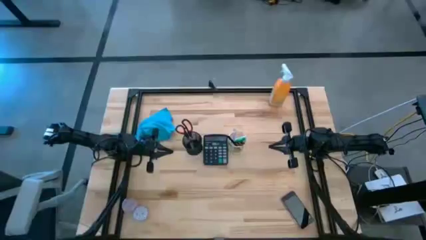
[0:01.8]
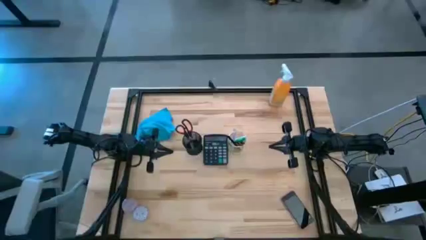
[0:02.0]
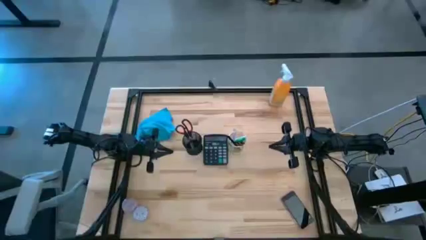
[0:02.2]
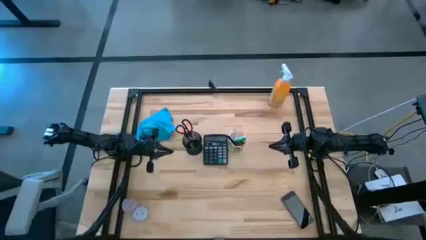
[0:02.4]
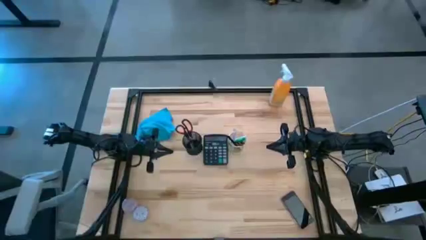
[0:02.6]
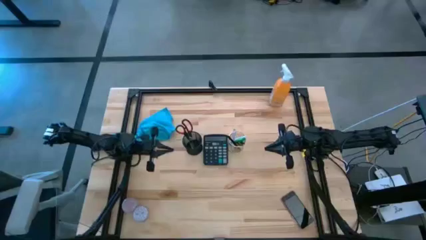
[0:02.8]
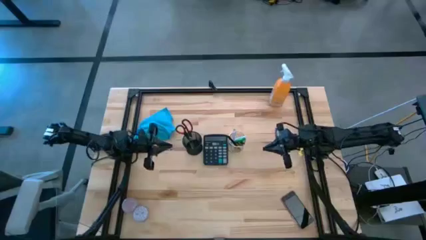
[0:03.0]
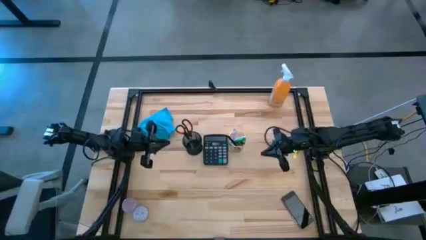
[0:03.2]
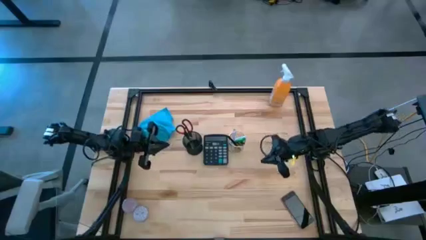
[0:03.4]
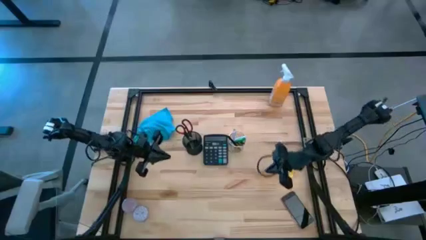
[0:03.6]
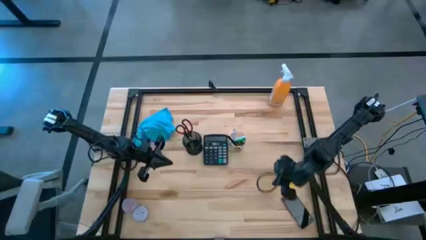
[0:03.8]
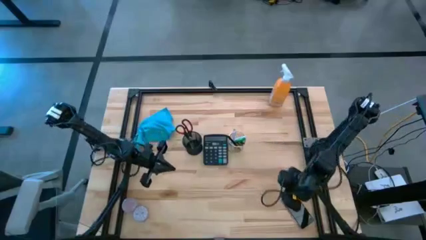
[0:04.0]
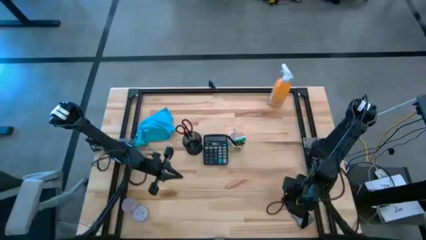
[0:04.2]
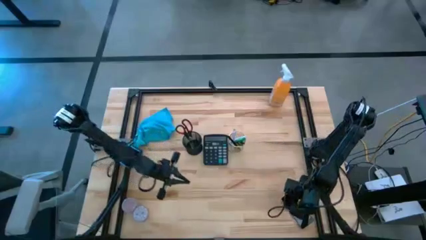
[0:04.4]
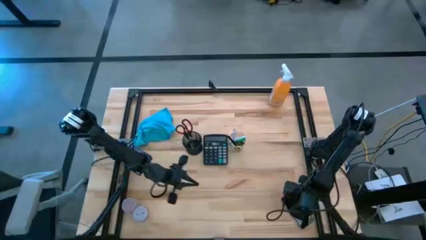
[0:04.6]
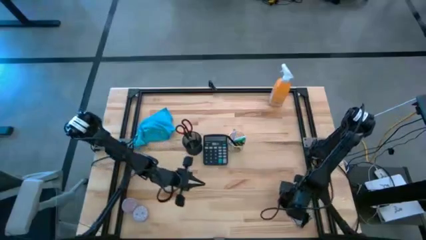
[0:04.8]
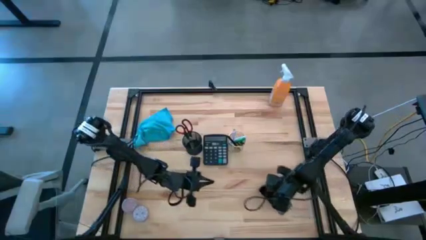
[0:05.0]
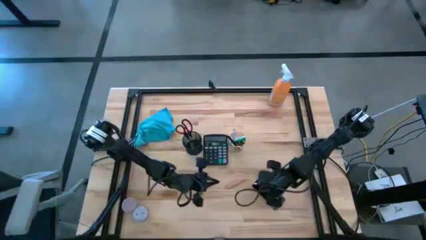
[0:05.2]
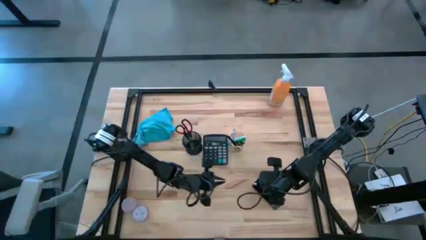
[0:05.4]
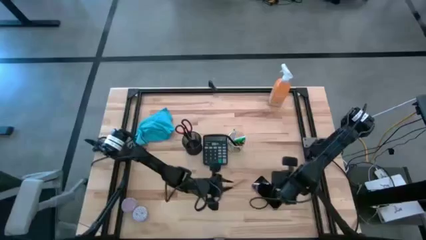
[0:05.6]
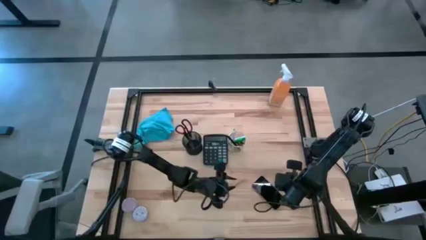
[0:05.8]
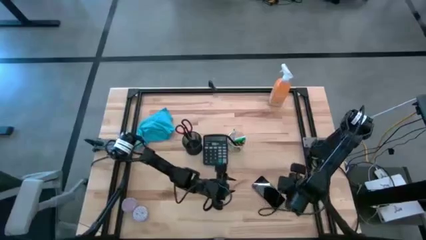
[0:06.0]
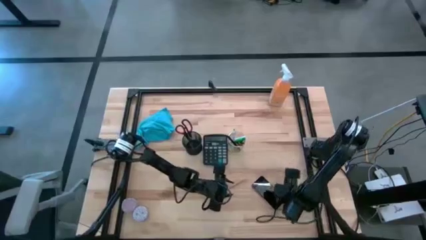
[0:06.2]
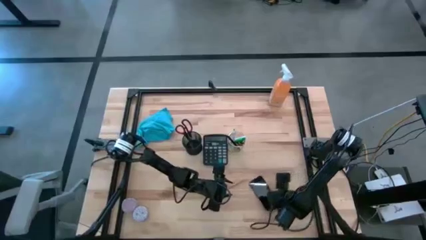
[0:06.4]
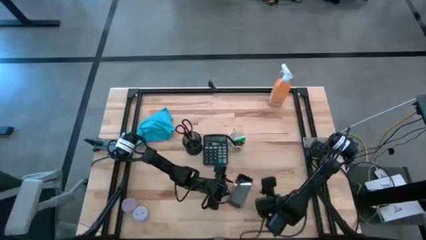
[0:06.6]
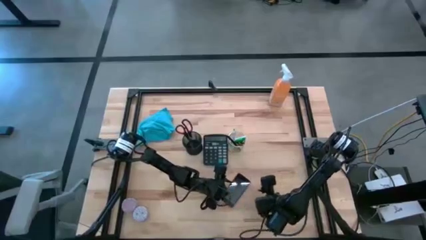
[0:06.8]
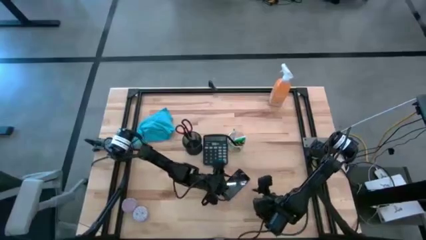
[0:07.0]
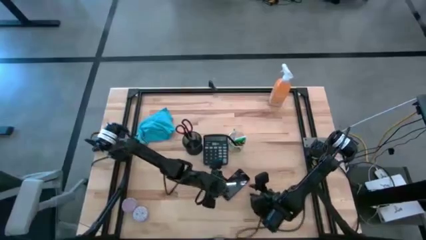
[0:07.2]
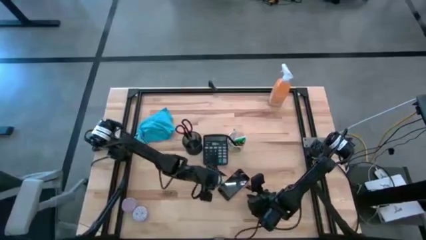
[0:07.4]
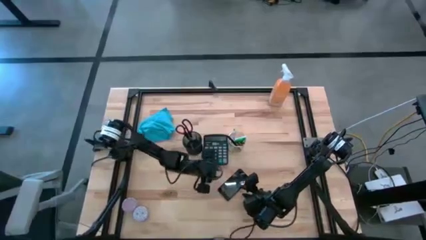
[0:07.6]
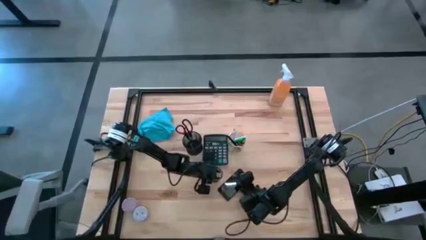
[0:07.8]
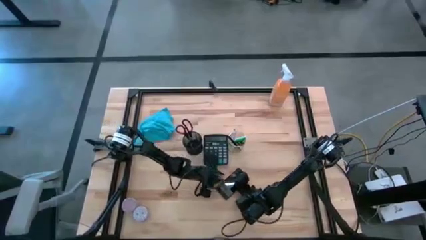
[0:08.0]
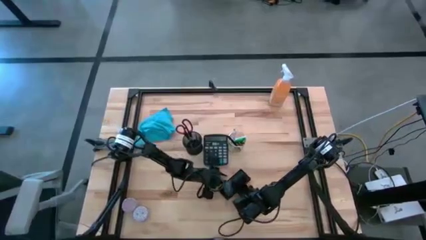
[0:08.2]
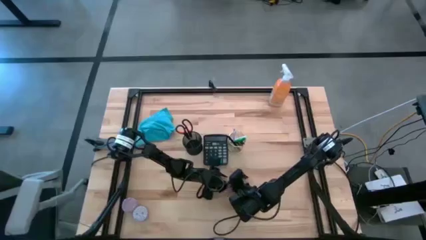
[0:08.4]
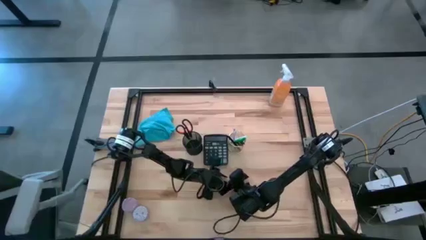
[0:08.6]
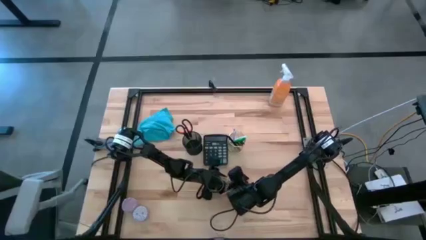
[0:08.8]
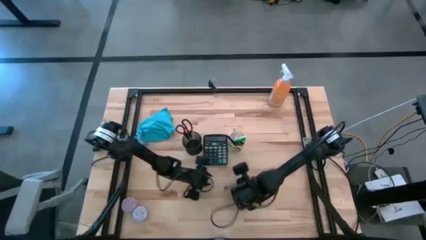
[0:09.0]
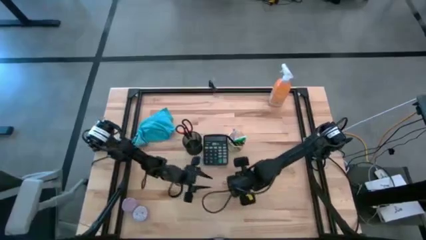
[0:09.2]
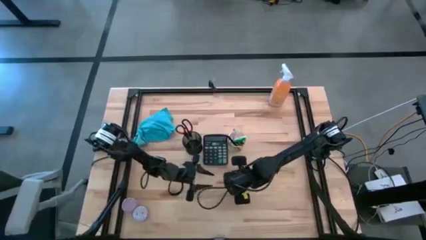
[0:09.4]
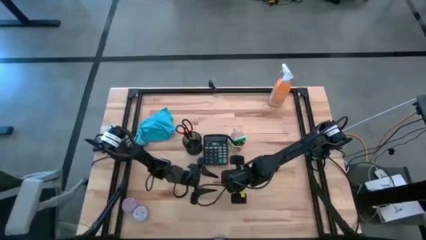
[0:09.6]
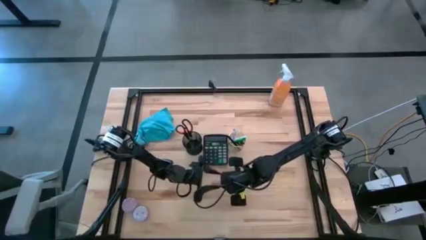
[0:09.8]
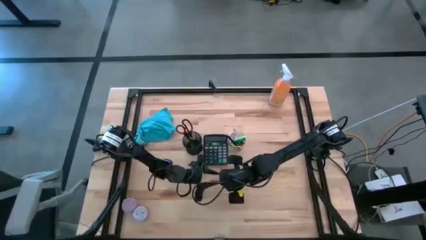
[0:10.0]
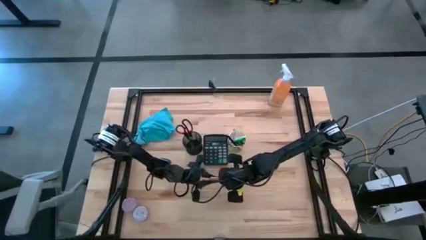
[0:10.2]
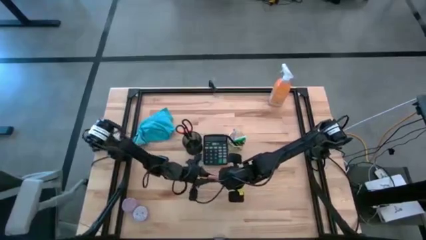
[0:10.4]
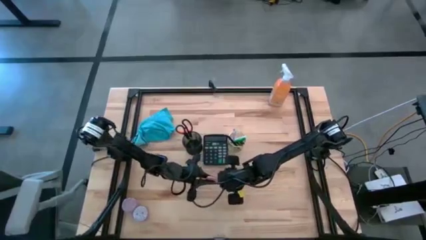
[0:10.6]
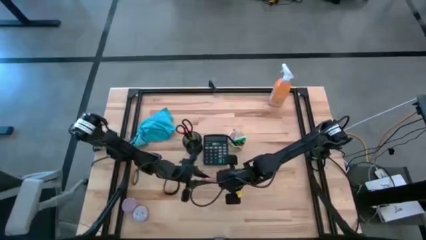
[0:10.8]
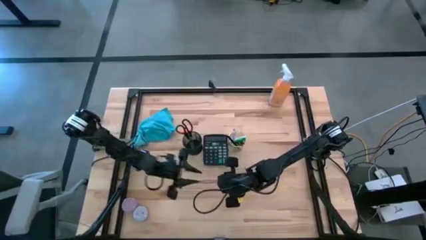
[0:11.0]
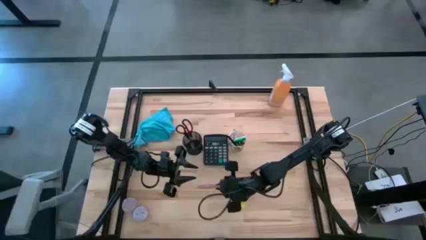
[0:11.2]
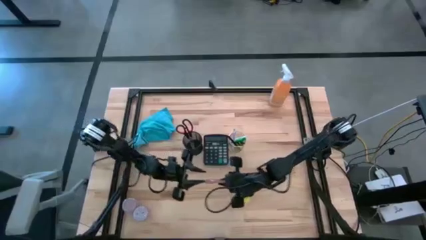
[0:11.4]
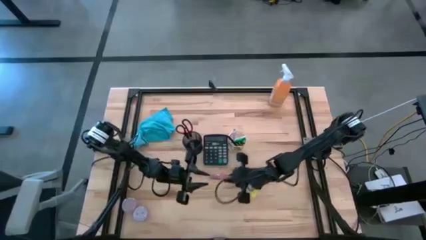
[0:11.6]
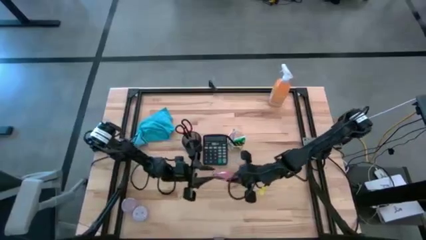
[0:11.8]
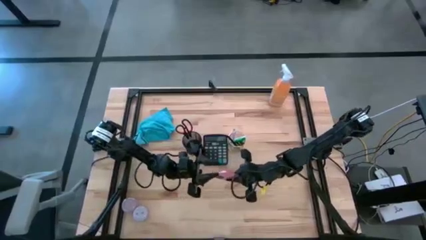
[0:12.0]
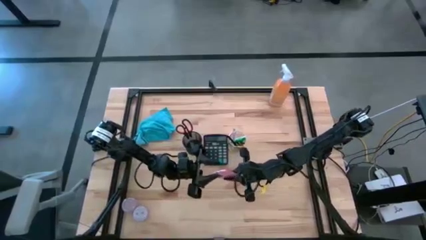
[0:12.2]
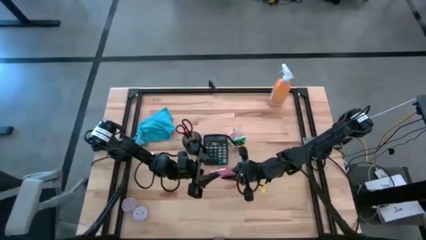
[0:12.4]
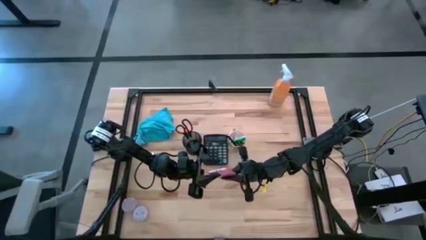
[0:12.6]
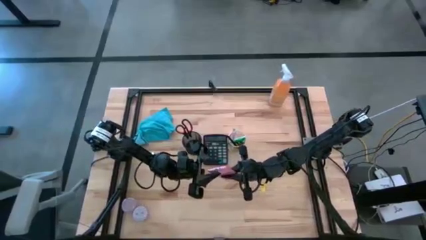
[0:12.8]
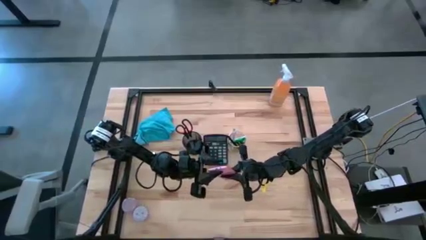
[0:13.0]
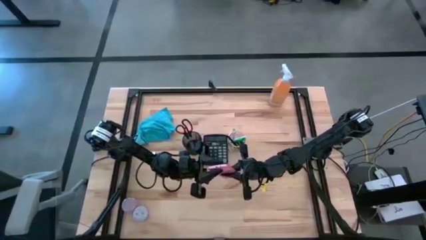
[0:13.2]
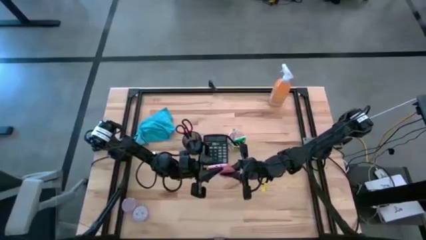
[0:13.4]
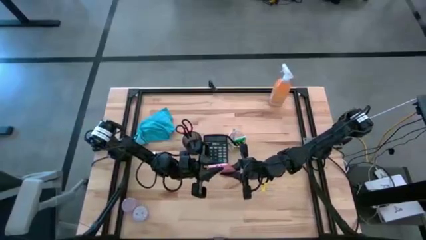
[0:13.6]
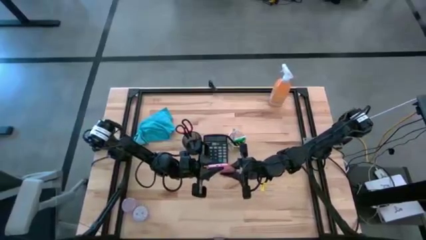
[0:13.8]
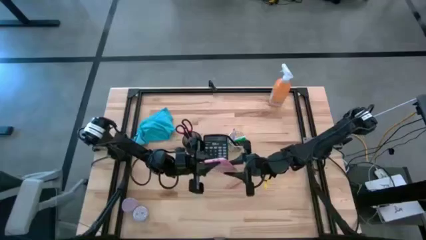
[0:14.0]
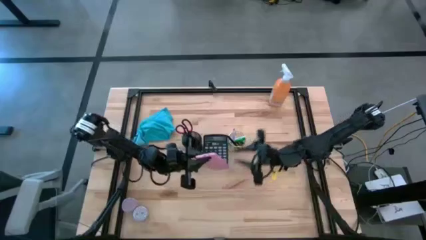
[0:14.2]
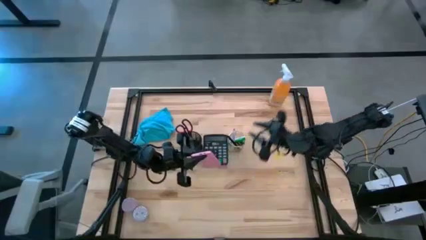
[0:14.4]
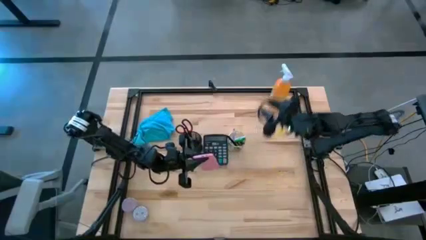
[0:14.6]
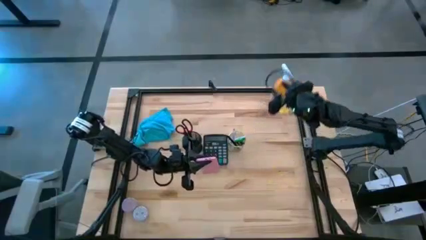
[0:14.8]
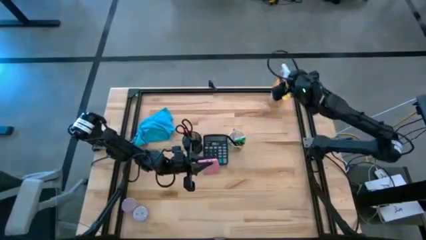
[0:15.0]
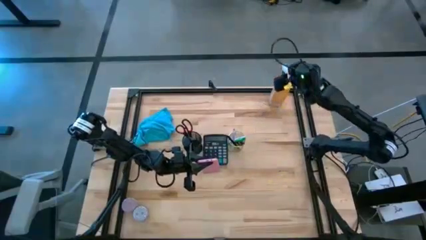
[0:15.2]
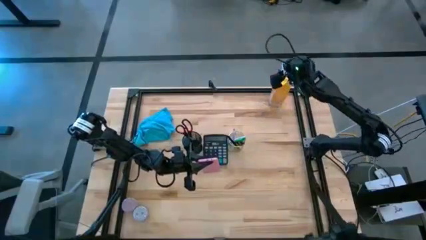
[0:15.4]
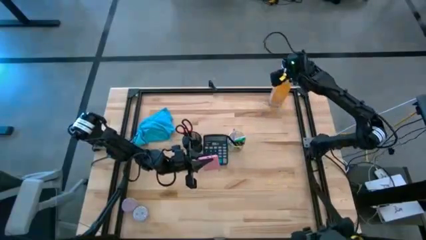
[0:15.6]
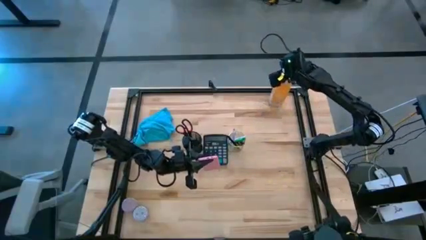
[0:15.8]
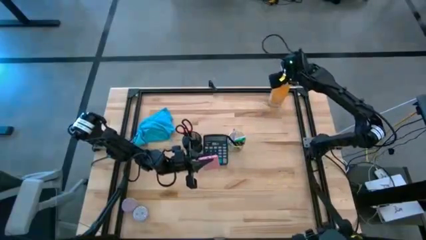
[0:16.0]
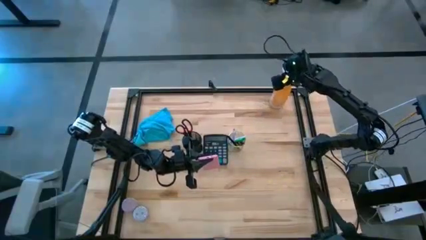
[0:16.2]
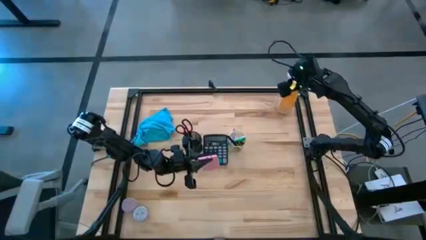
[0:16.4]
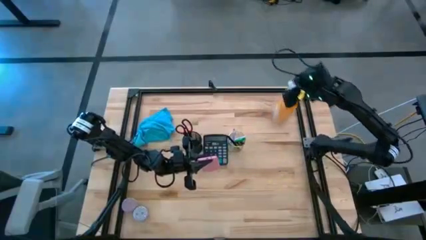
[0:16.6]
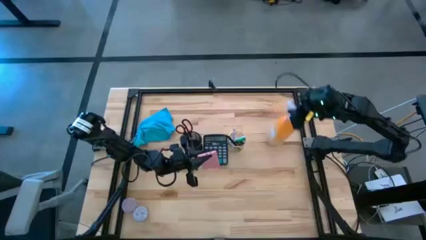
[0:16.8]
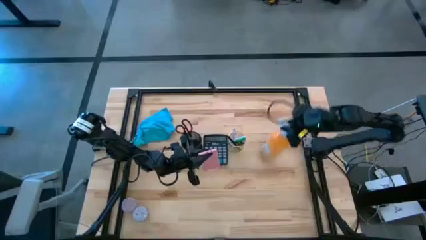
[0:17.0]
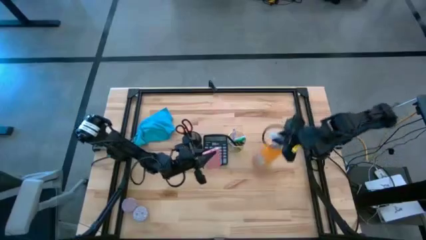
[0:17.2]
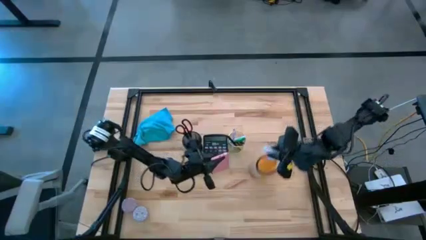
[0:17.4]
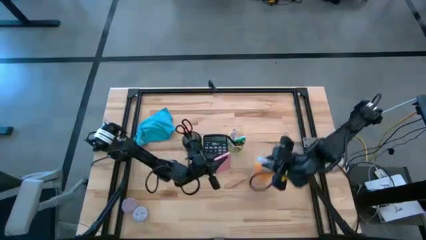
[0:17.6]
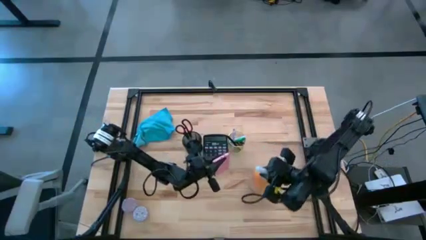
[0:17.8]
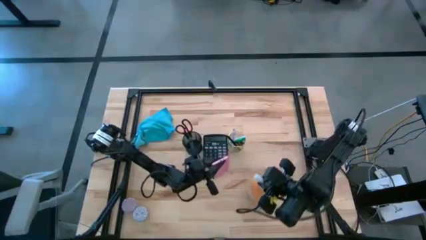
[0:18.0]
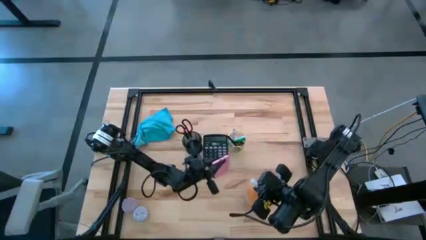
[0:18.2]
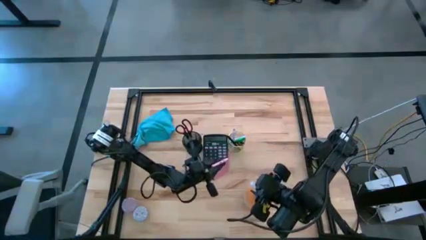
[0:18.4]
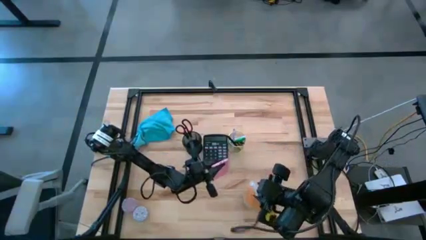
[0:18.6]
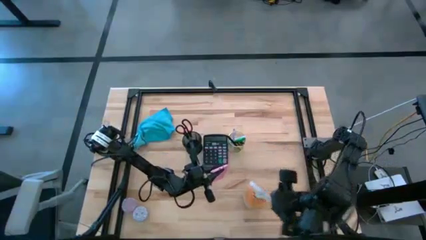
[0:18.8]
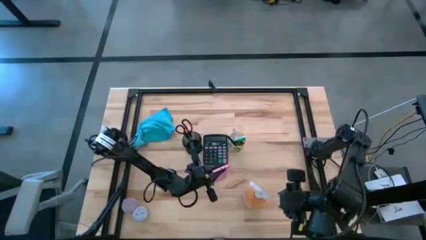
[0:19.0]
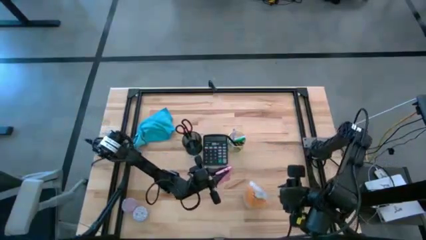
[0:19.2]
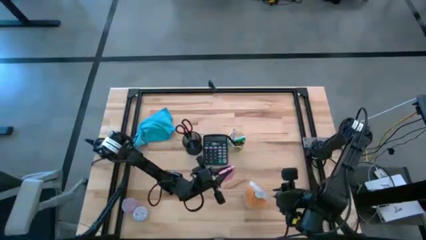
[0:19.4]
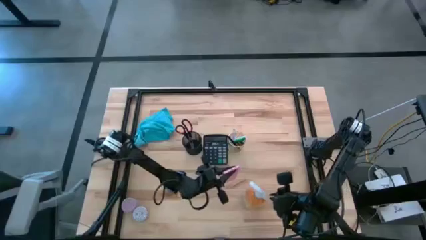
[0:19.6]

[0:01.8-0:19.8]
Task: Apply microfiber cloth
Spray the back and front of the cellphone with the orange spray bottle
